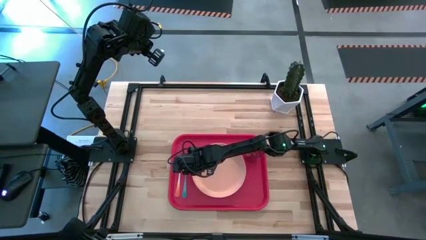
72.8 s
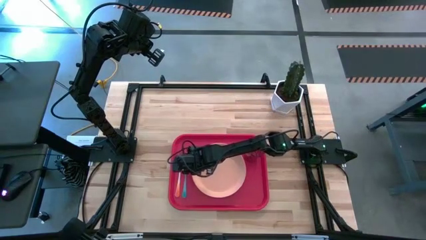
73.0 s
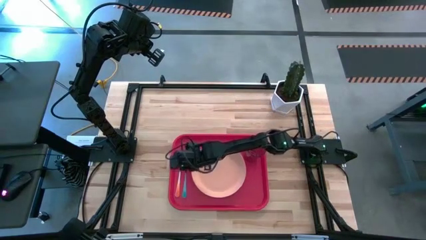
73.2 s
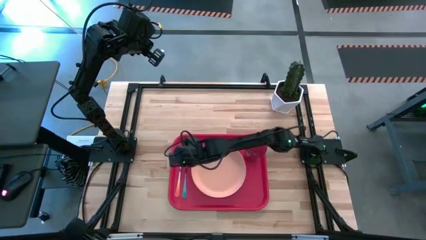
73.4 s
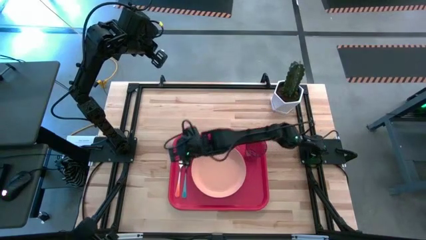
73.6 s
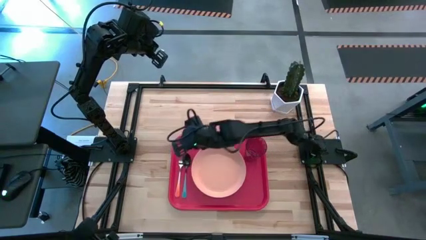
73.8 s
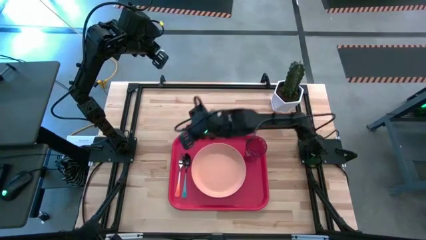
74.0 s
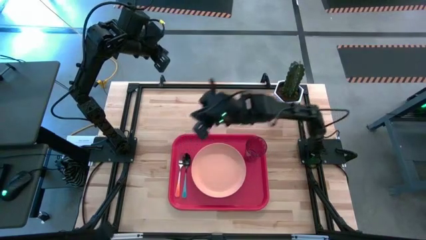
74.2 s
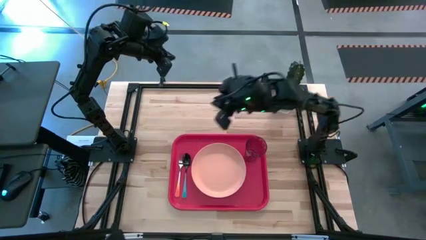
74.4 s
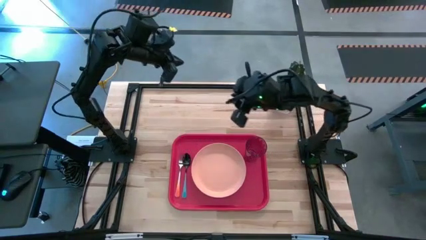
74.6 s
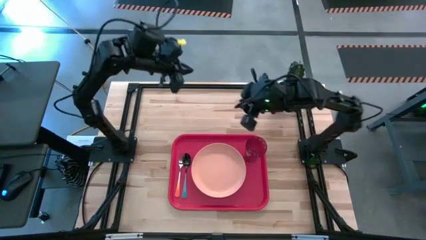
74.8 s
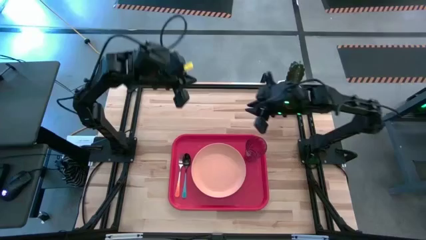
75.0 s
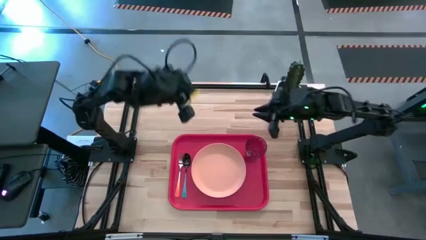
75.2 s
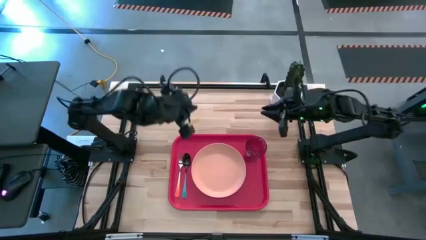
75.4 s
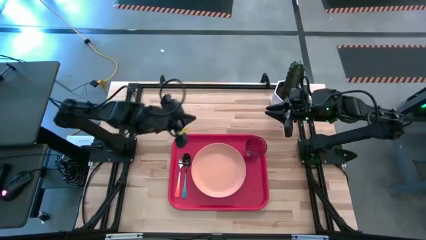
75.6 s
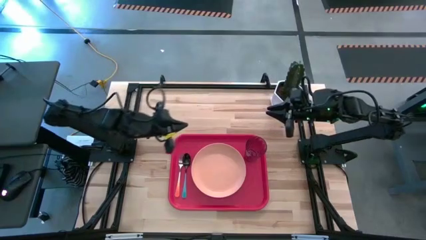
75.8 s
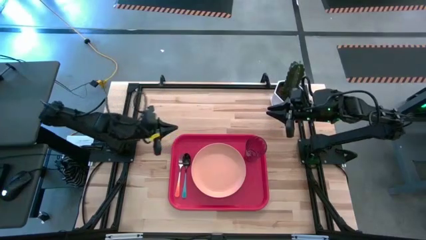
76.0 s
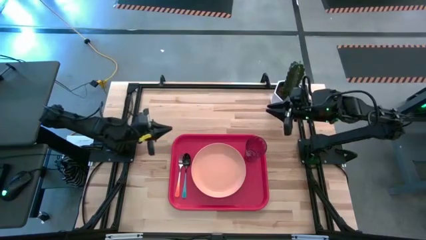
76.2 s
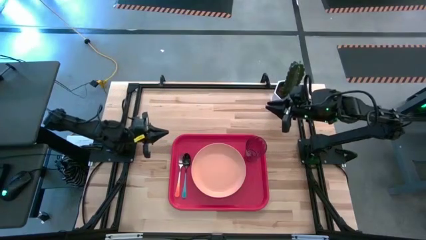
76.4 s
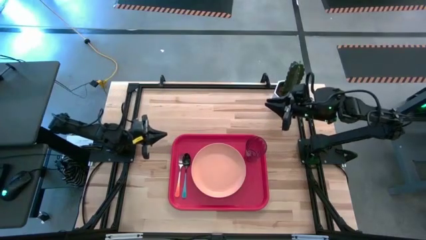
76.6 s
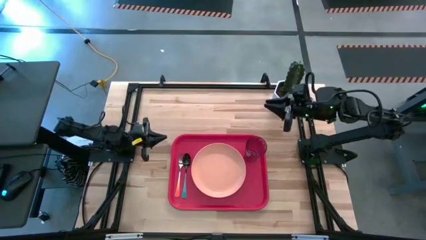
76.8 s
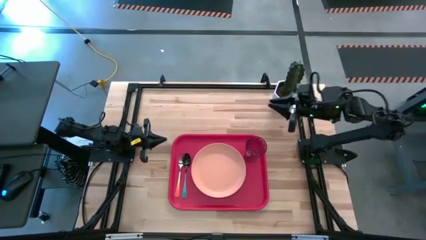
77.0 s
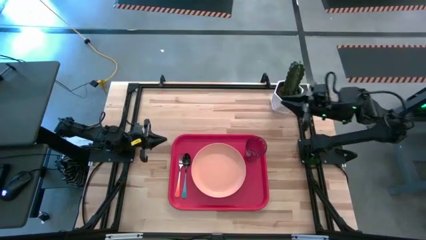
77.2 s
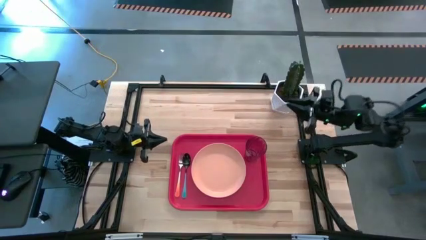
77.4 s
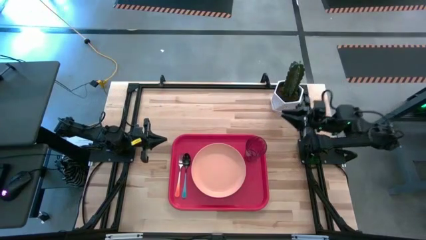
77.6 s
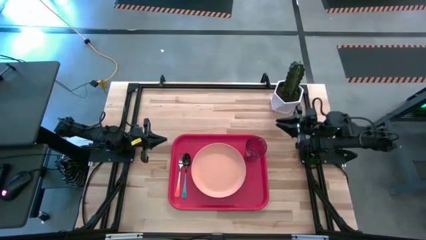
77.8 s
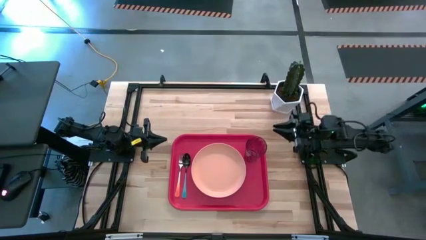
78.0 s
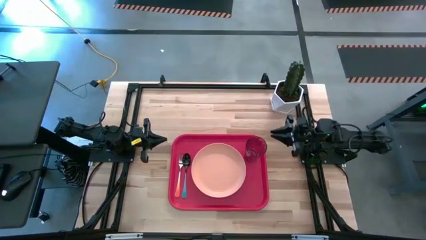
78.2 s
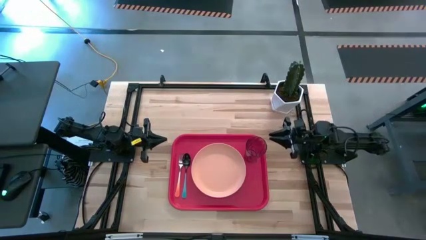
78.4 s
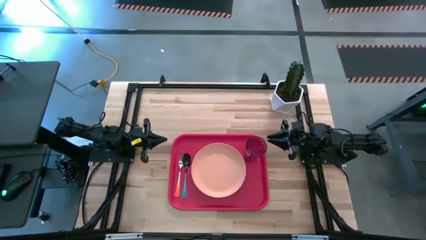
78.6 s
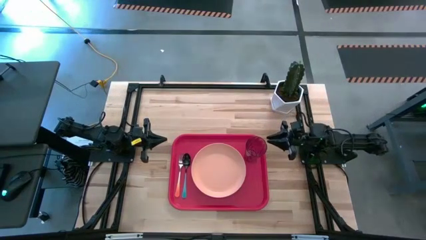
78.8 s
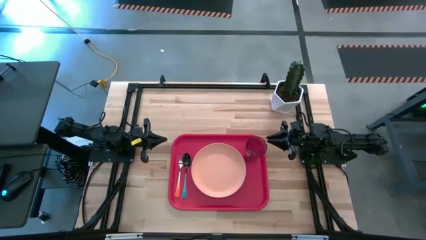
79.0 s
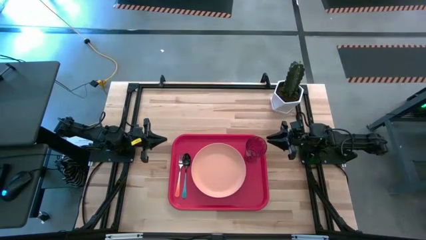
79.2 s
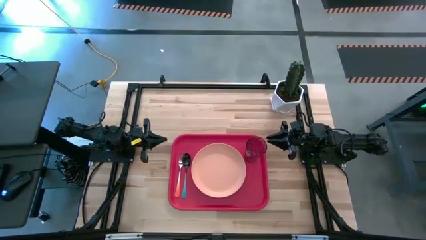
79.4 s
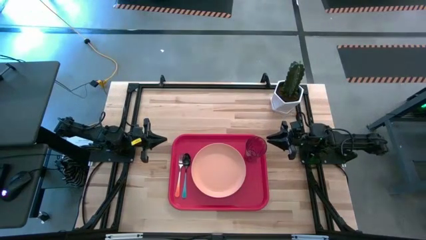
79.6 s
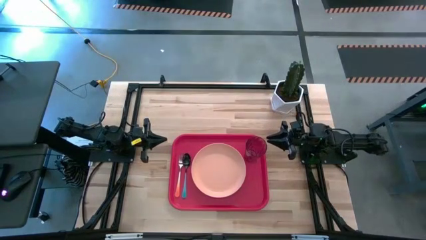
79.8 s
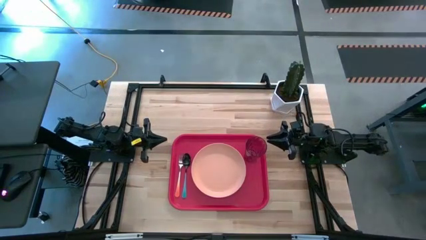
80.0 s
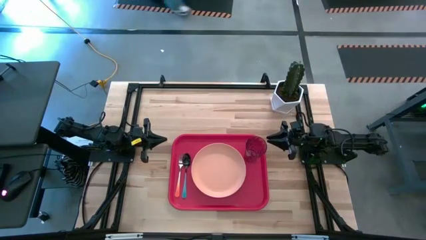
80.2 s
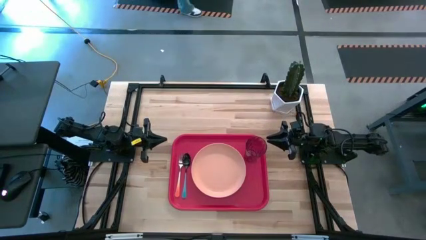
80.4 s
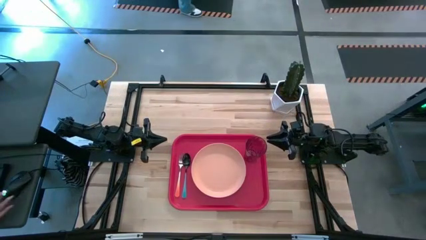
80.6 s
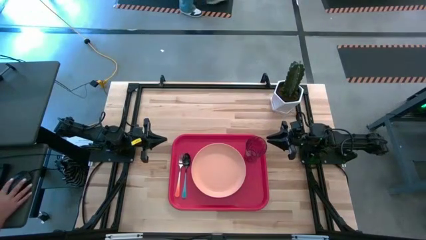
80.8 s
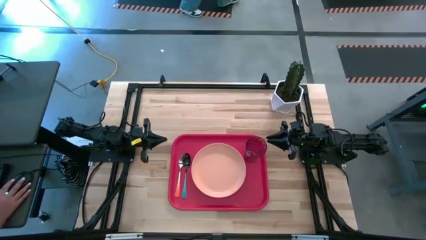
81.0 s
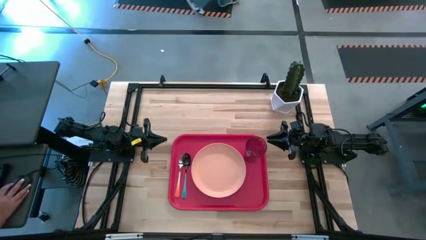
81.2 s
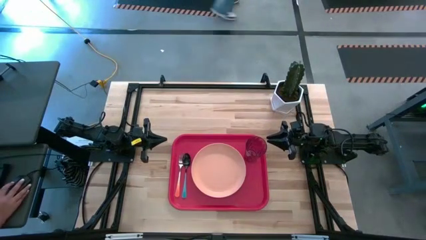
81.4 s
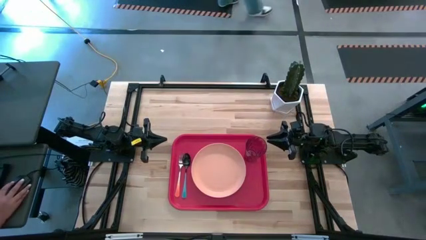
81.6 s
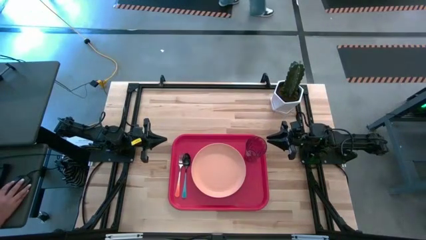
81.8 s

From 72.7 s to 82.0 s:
Task: Pick and place plate/cup/fork/spoon on tray
Return to Home Position

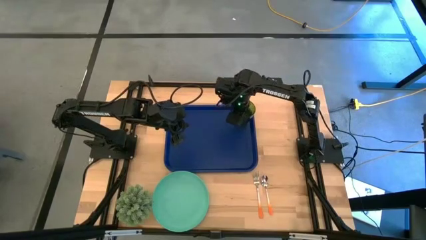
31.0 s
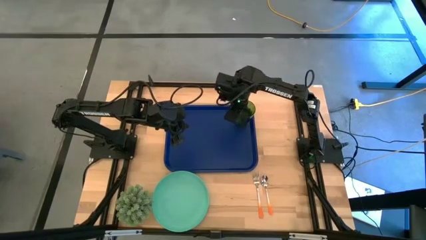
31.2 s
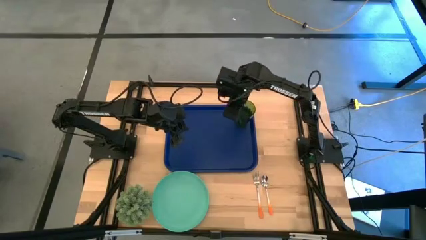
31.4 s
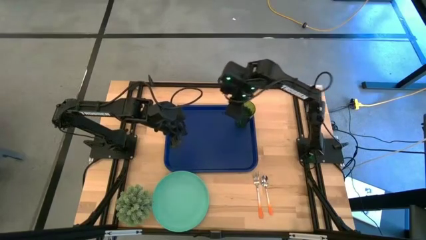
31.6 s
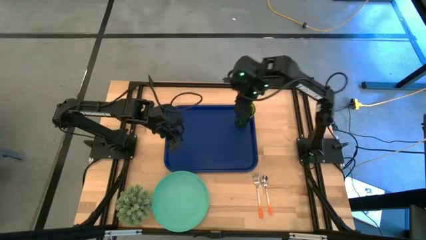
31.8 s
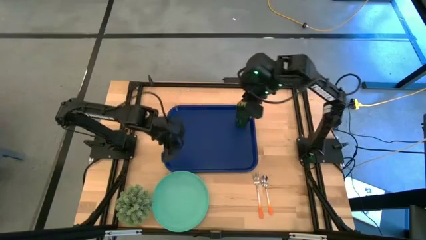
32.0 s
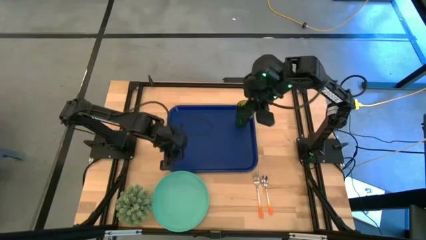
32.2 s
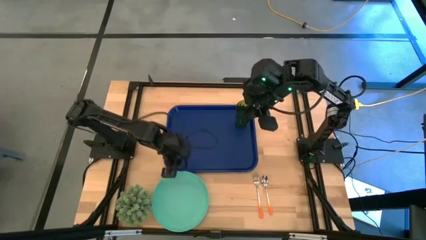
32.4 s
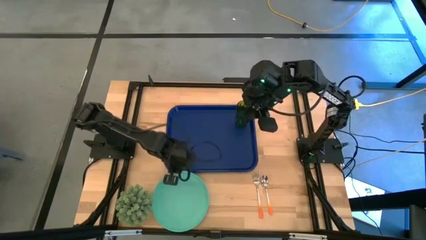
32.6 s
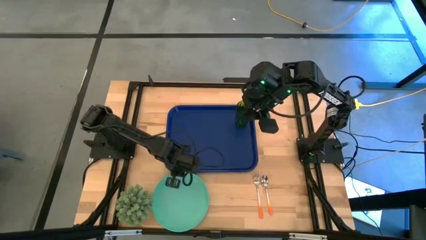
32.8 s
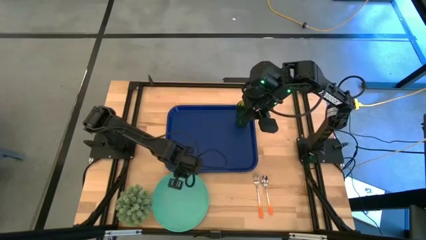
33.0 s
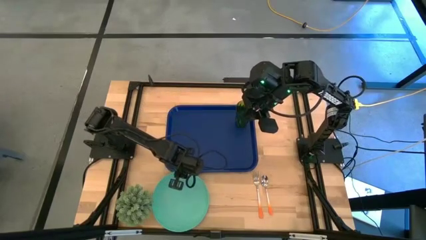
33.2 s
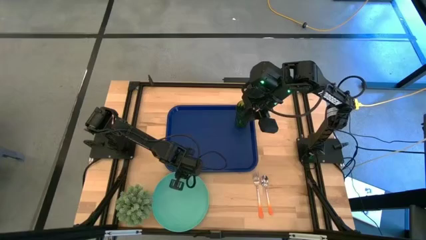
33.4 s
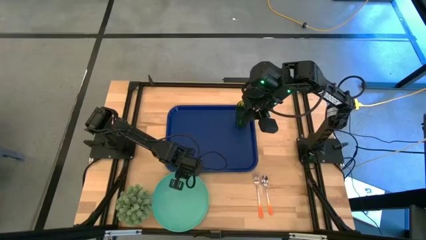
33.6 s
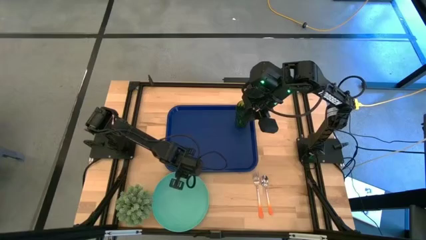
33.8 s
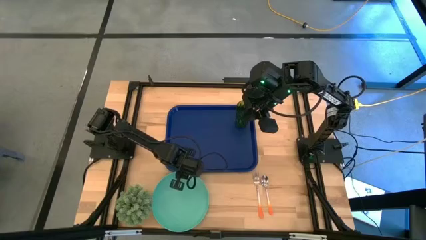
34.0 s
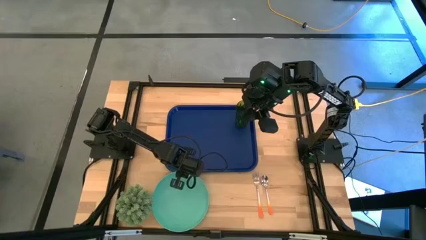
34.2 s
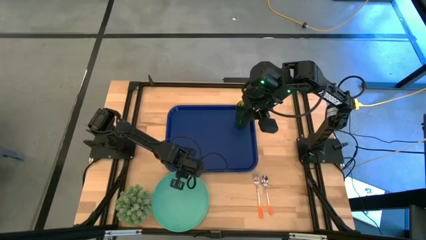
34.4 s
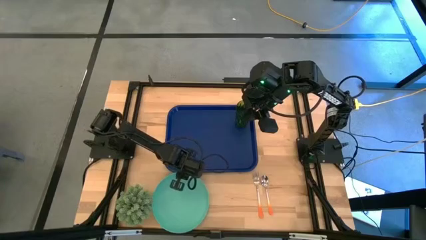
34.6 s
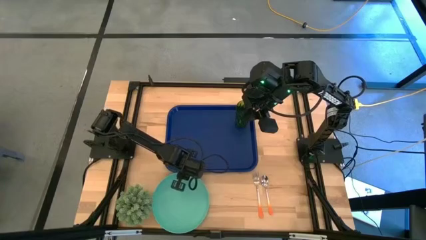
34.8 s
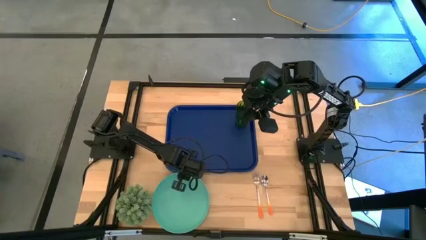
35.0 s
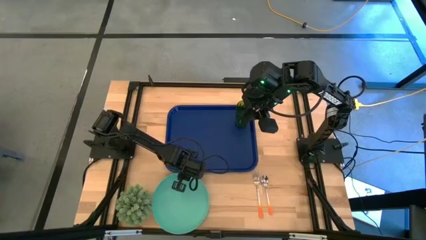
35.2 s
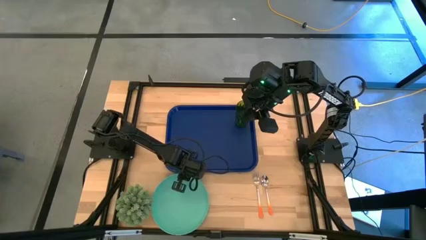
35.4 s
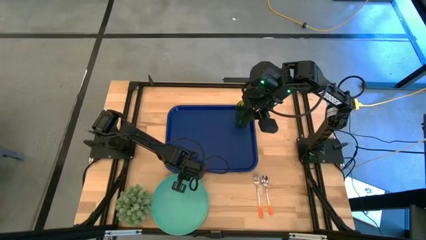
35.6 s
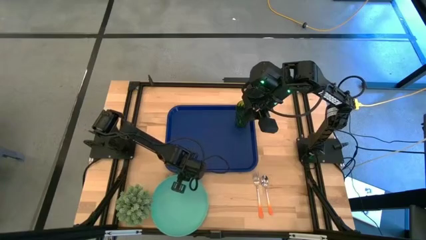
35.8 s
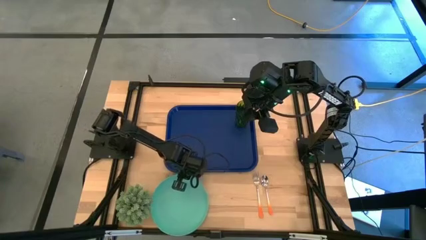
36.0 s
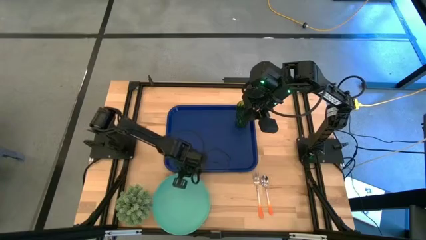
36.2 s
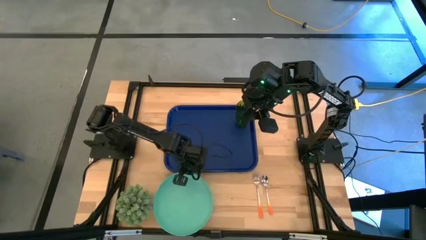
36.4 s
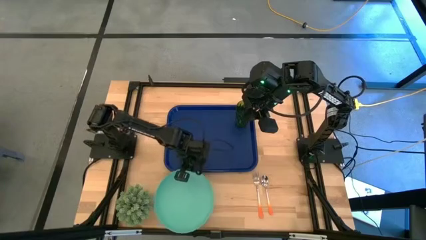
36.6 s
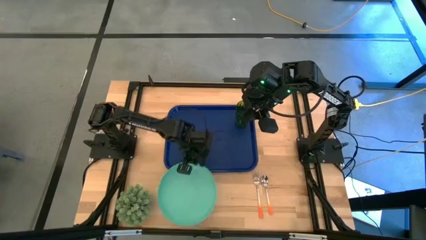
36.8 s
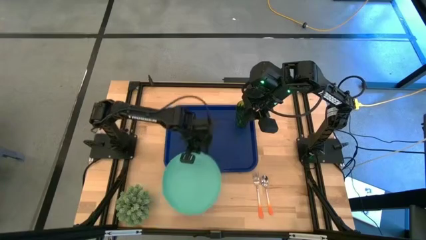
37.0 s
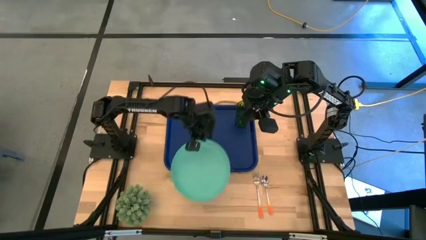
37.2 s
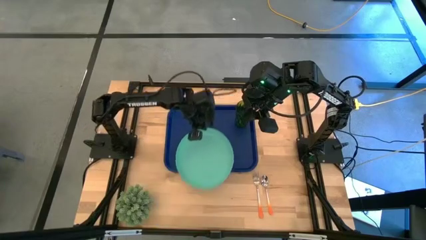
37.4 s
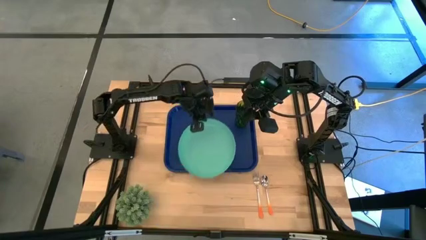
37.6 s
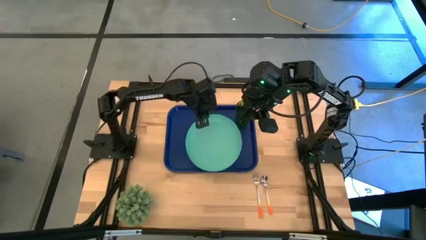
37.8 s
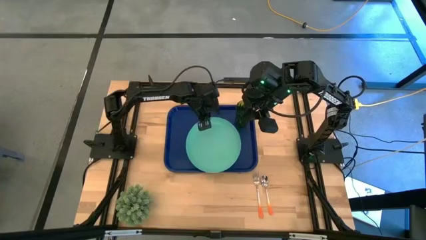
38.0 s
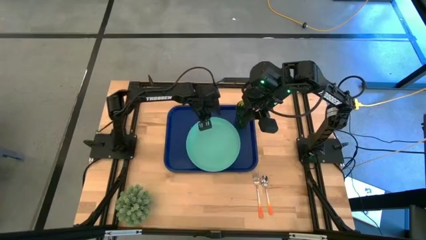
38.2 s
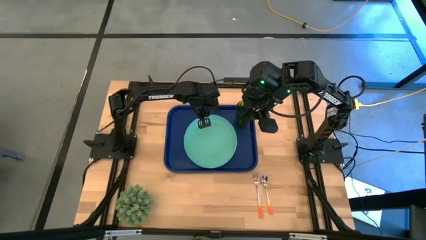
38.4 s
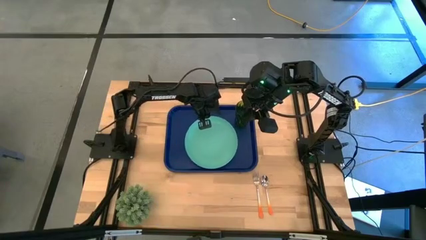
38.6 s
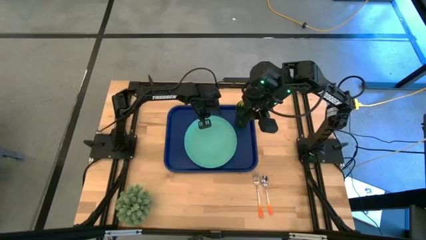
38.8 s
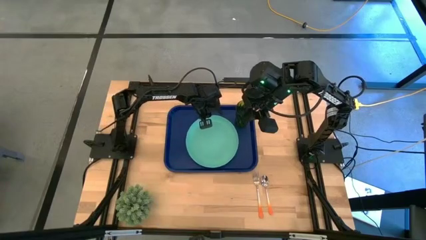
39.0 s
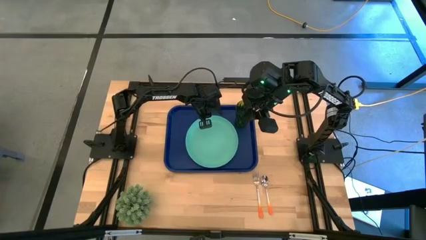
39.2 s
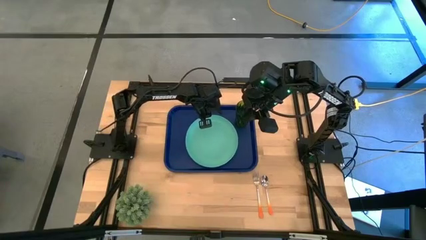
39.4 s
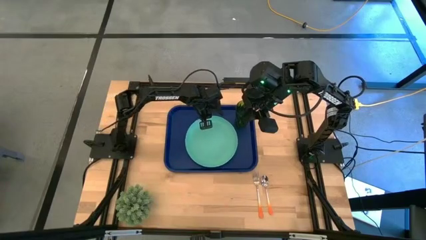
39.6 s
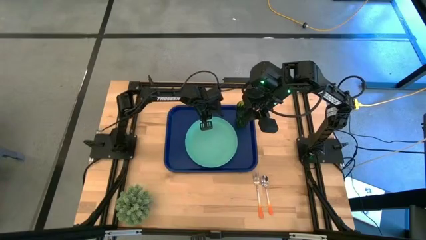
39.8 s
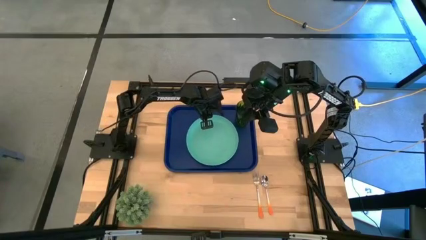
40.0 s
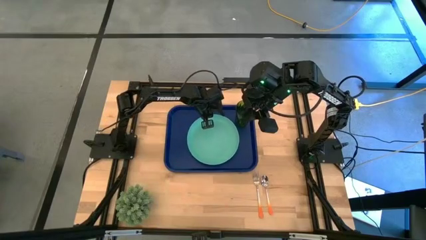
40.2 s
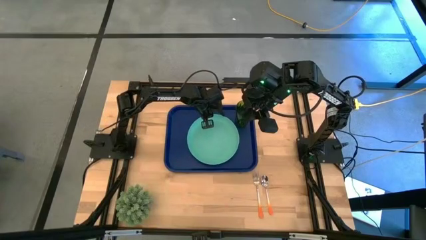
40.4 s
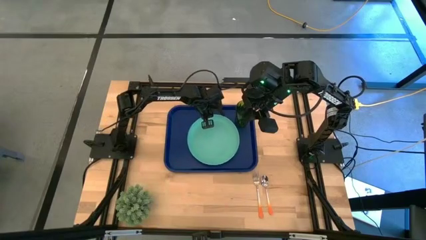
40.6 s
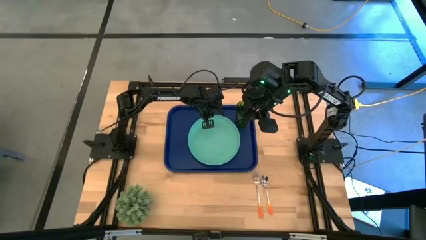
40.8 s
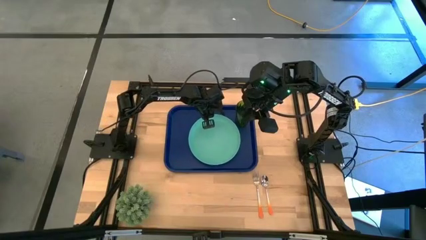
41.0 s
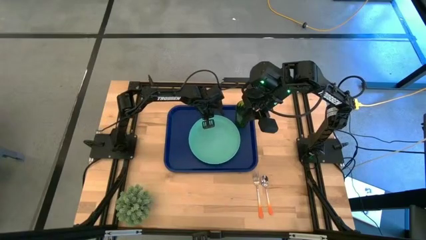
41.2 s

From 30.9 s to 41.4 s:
Task: Pick and place plate/cup/fork/spoon on tray
Put the green plate on the serving tray to the bottom left of the red cup
